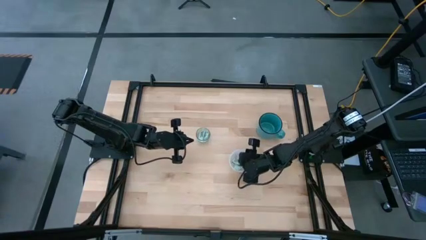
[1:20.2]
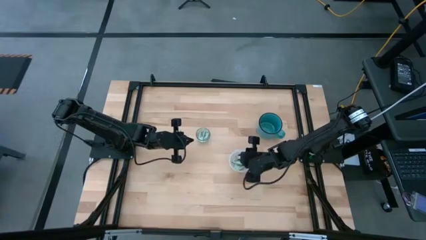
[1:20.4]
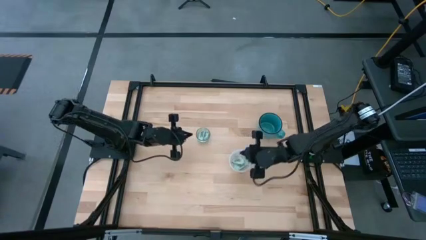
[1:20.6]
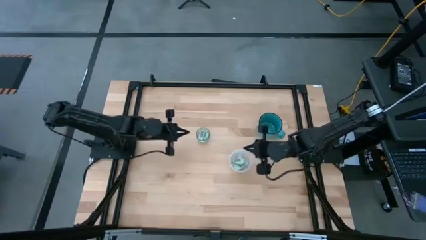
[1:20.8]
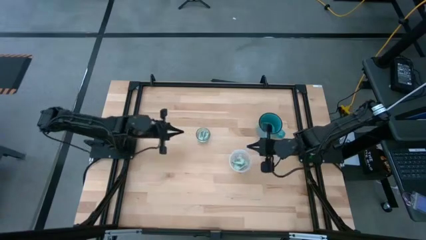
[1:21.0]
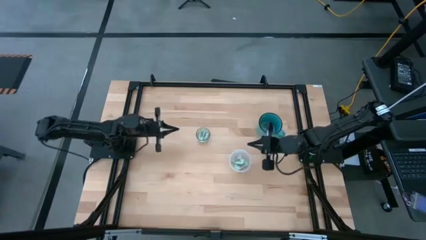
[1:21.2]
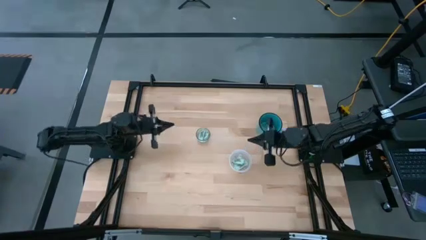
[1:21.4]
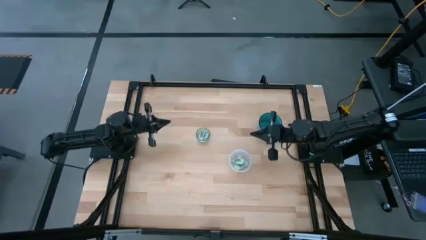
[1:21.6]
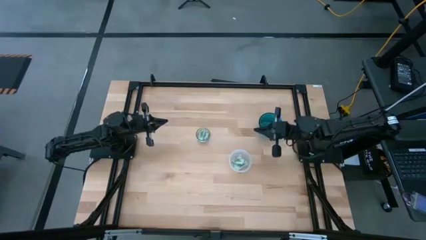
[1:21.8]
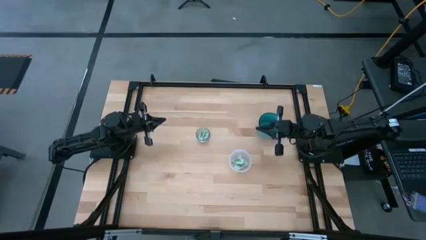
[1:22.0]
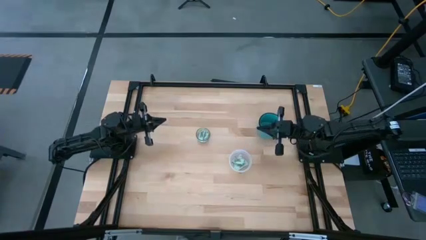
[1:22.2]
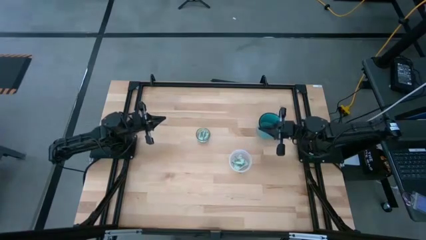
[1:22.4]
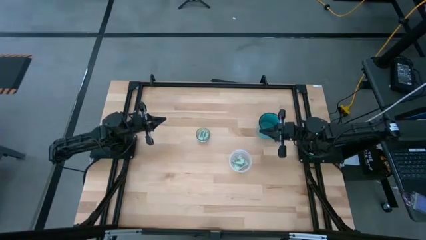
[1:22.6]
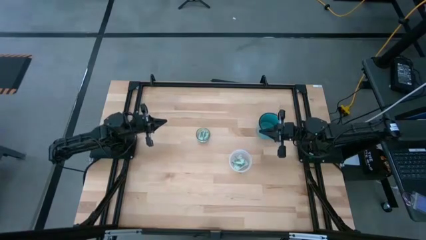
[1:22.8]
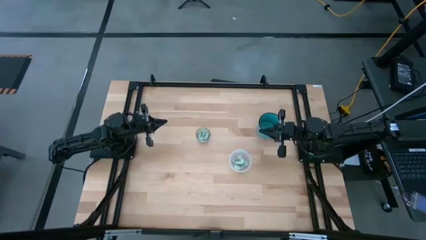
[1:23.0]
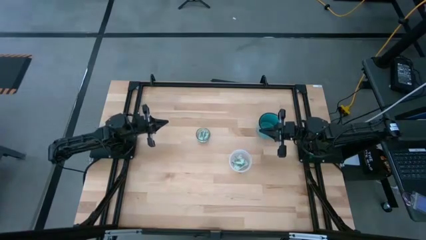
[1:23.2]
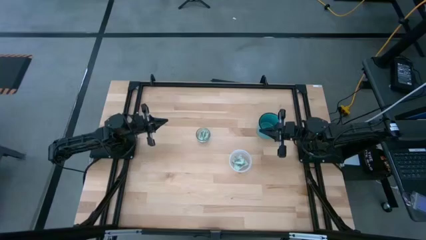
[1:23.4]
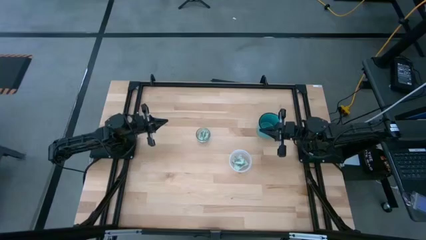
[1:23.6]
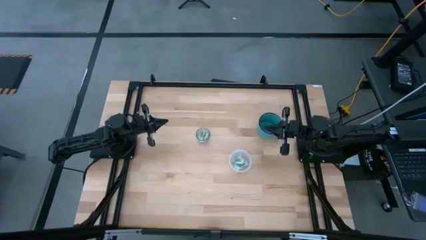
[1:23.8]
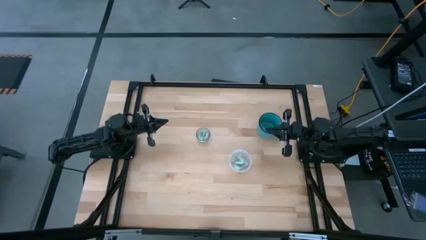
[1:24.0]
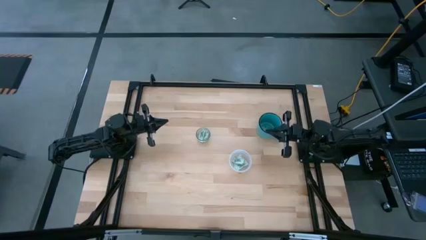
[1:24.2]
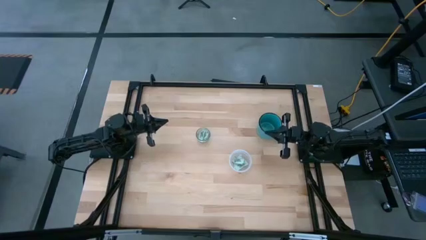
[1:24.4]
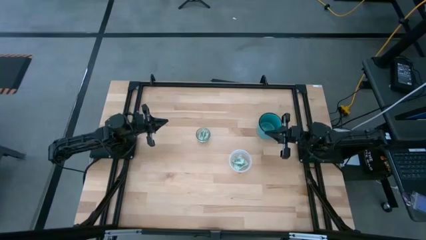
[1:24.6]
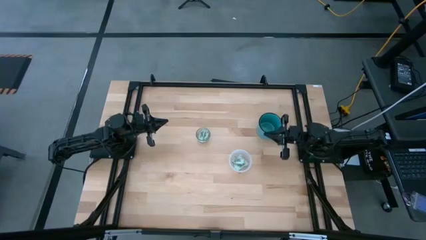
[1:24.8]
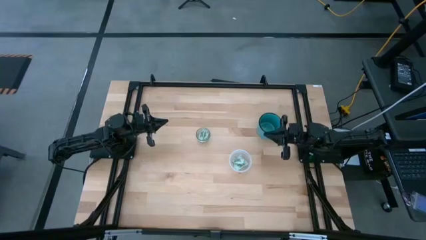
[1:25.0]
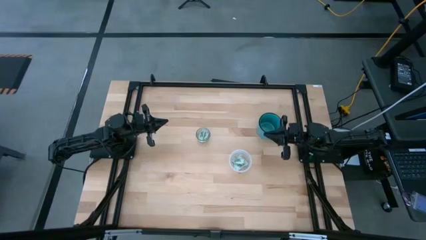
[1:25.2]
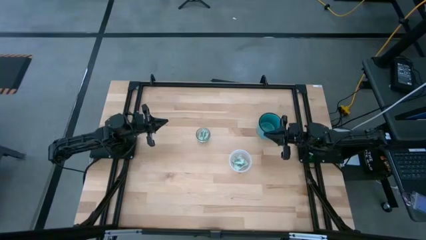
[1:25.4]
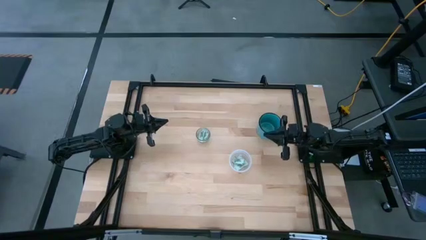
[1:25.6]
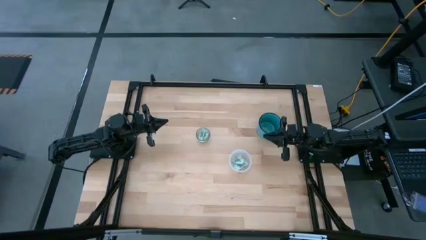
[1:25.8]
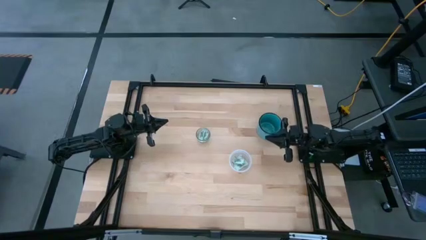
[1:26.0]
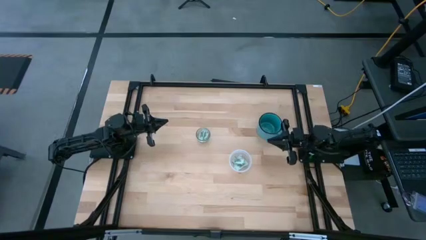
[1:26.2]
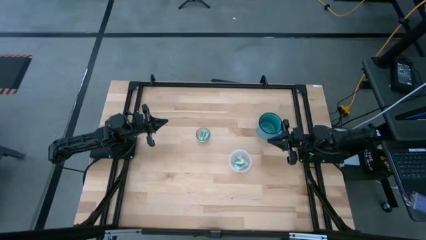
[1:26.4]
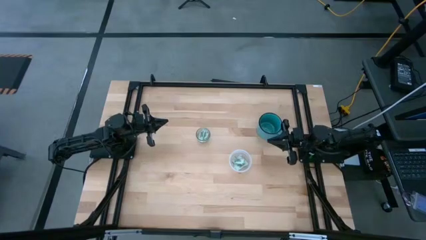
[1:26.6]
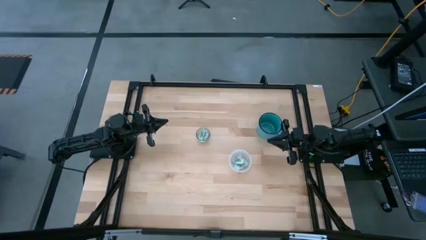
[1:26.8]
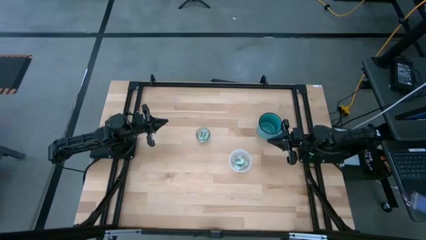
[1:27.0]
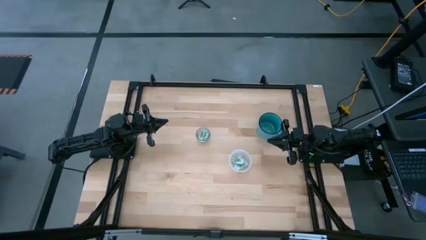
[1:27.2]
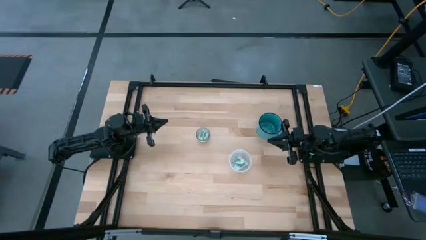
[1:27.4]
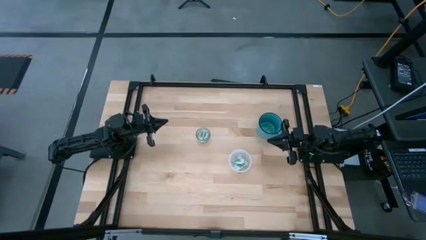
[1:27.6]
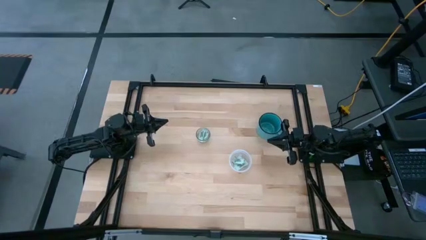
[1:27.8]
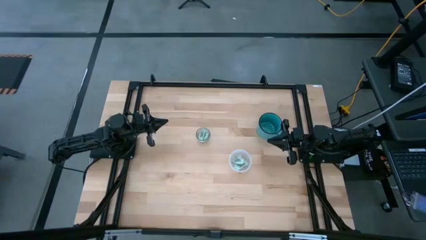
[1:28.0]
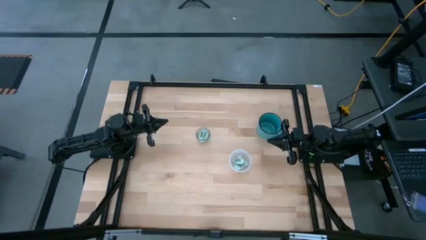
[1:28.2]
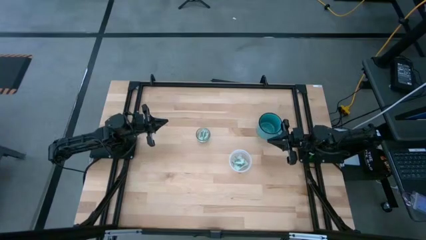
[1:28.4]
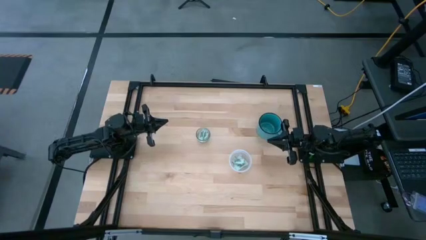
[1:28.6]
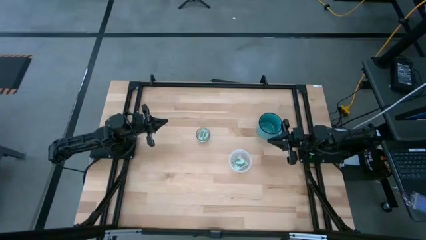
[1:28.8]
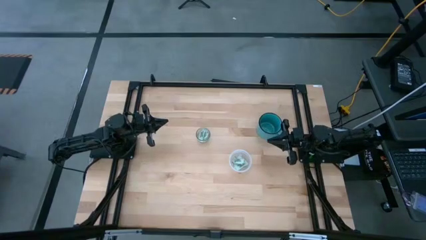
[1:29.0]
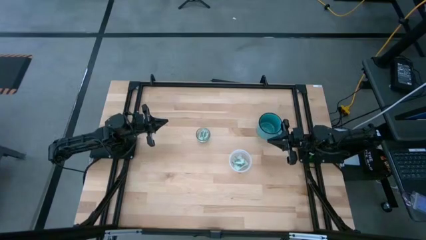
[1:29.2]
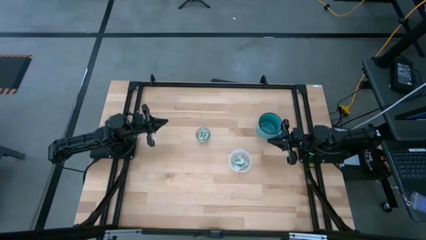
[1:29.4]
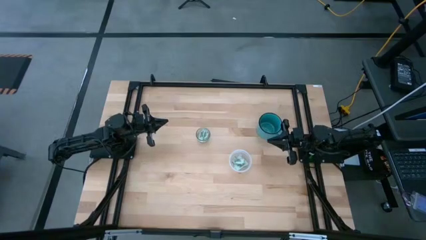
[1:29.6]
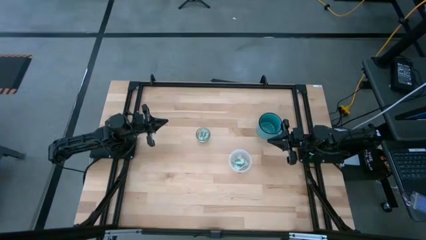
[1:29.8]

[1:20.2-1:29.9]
Task: Pick and place Stevia / Truvia into bins
Return to Home Position
